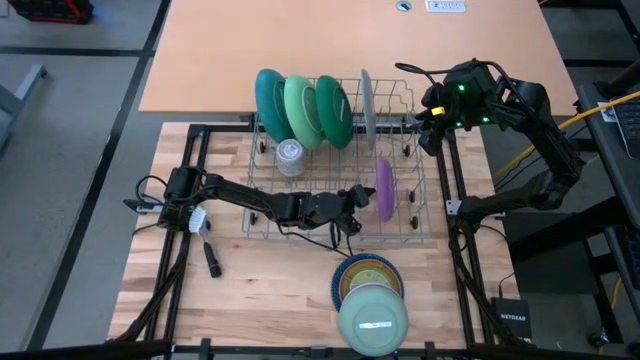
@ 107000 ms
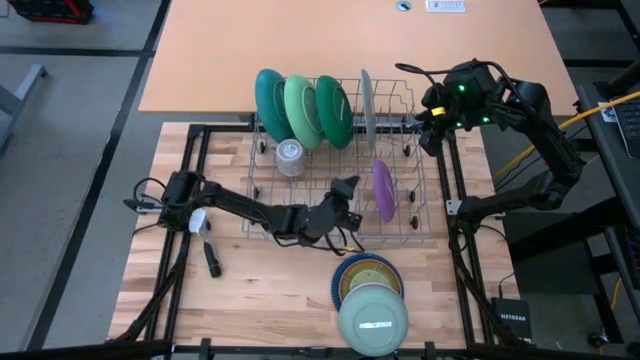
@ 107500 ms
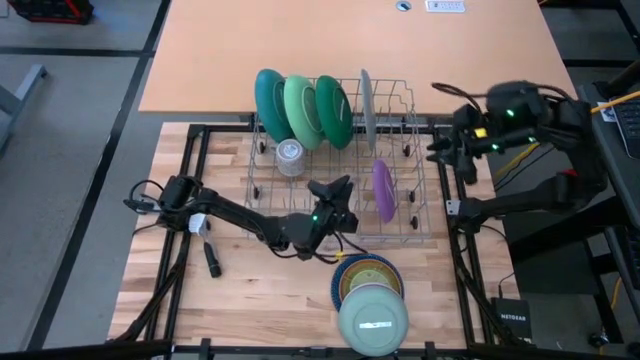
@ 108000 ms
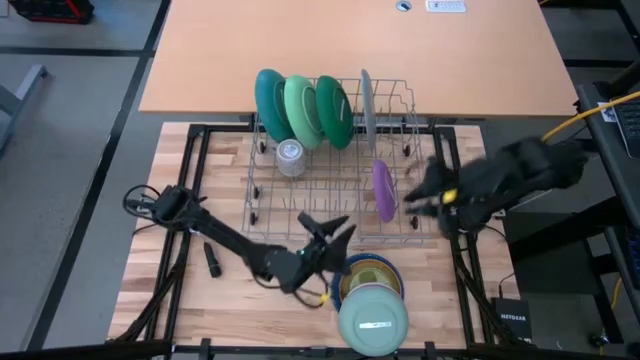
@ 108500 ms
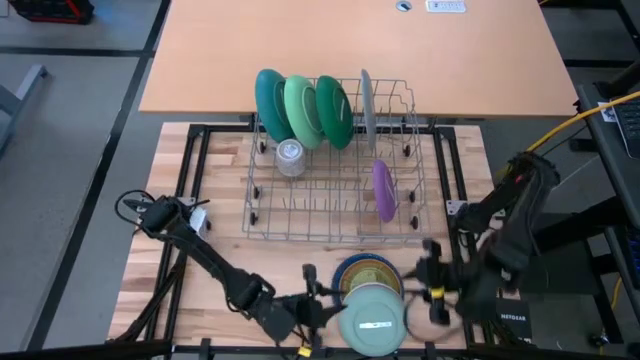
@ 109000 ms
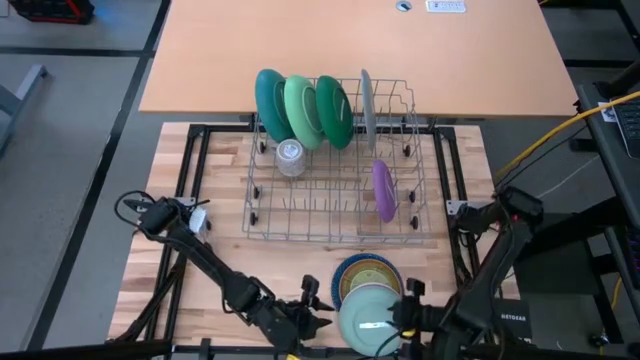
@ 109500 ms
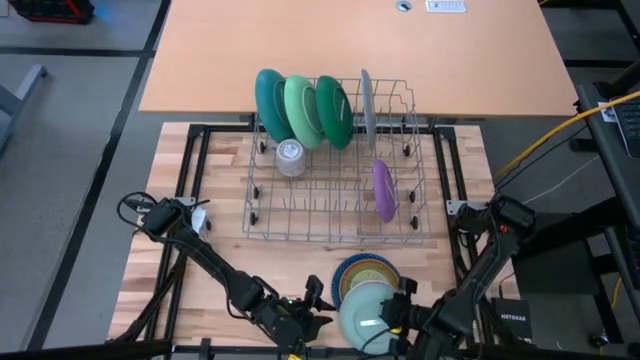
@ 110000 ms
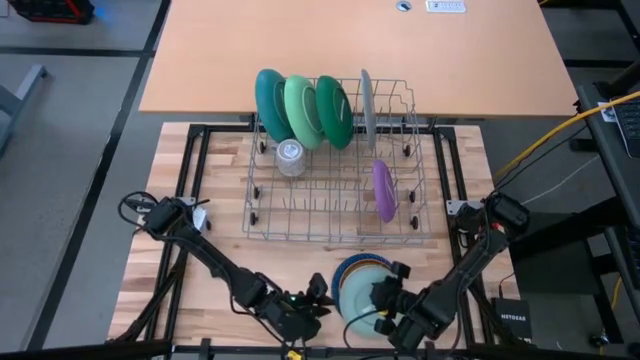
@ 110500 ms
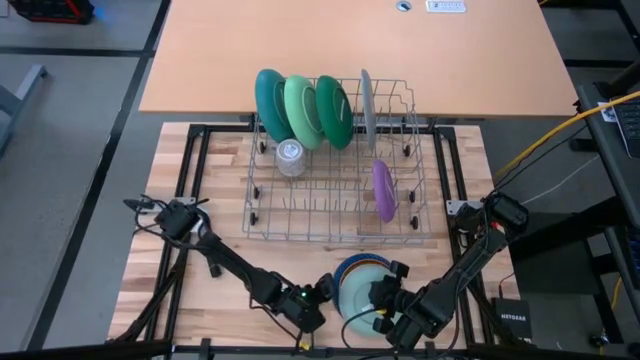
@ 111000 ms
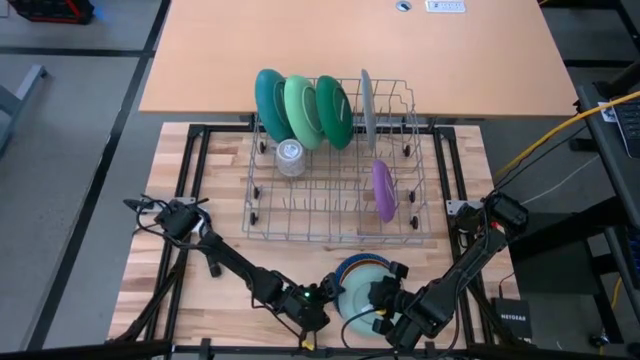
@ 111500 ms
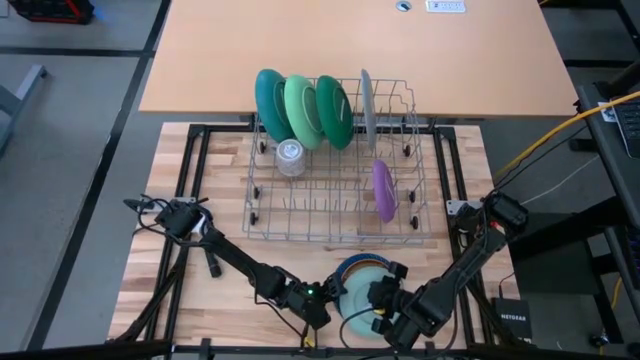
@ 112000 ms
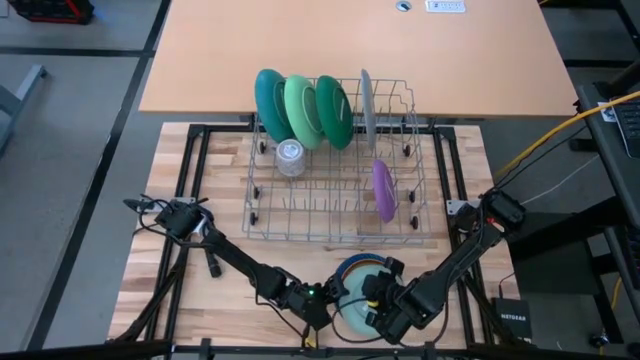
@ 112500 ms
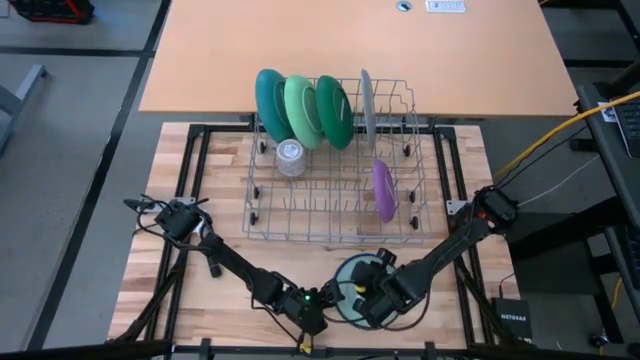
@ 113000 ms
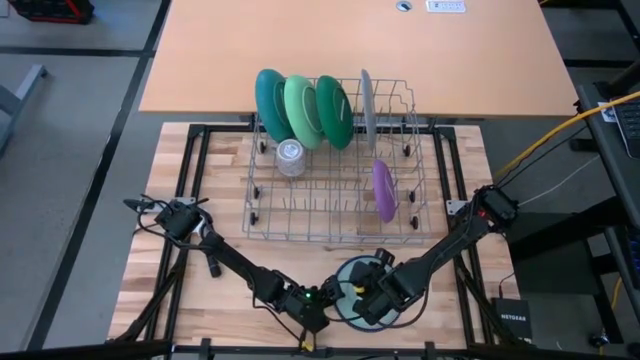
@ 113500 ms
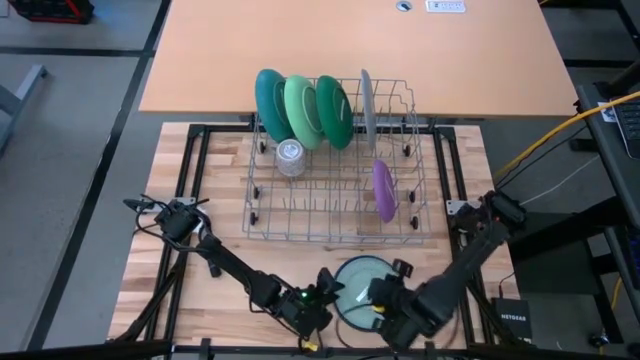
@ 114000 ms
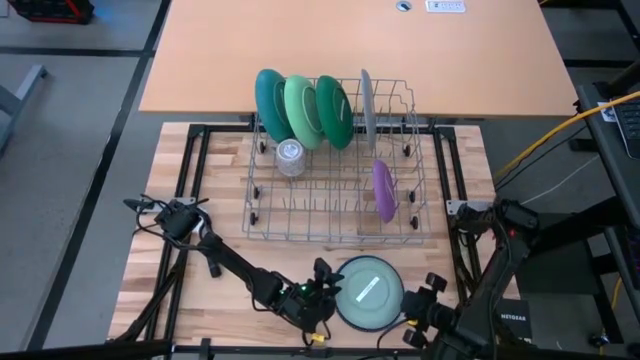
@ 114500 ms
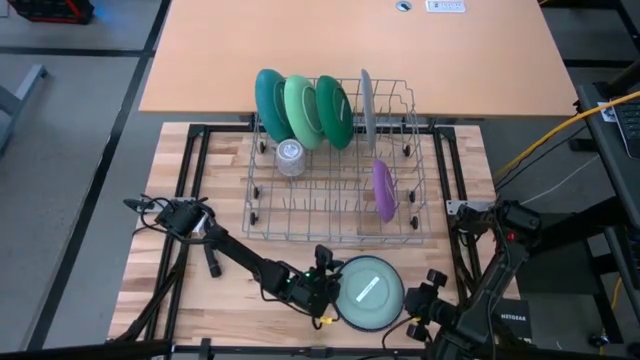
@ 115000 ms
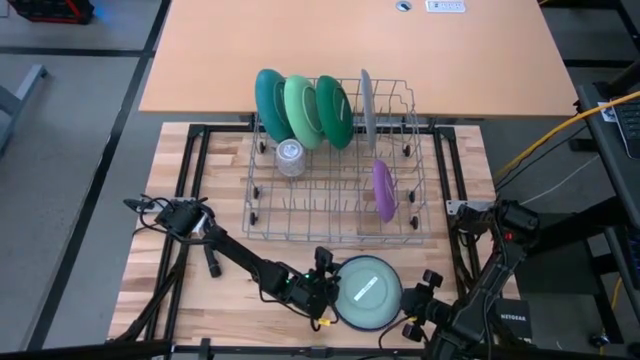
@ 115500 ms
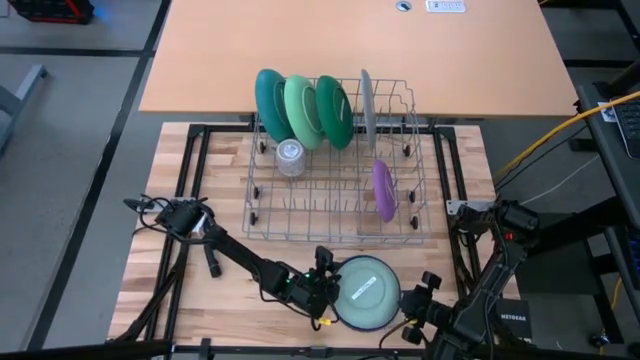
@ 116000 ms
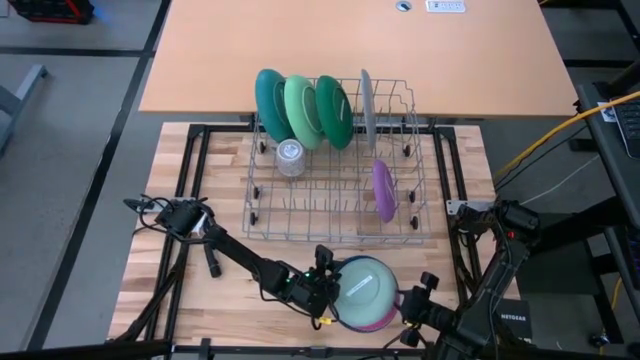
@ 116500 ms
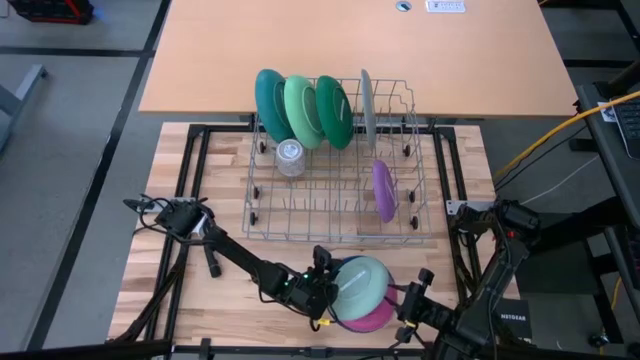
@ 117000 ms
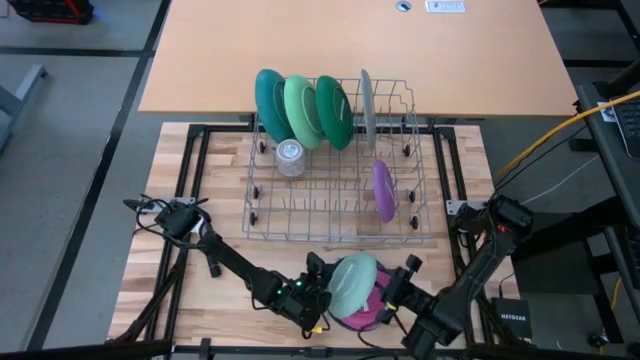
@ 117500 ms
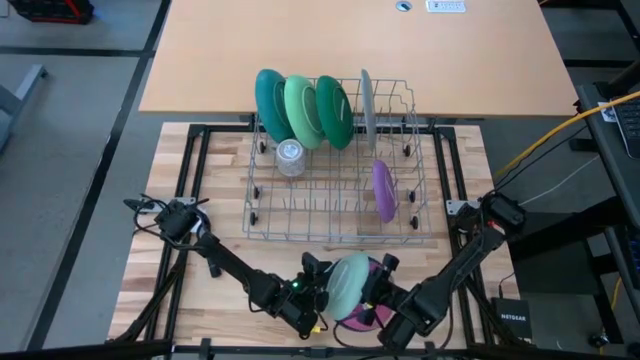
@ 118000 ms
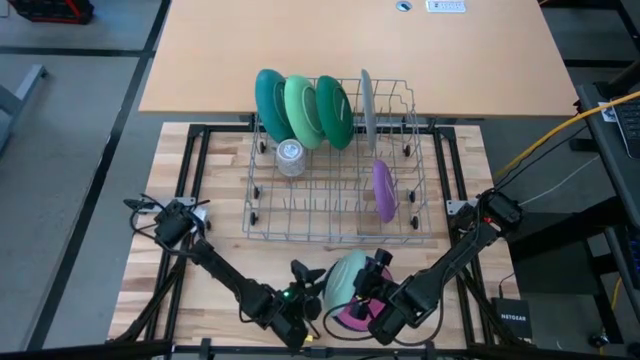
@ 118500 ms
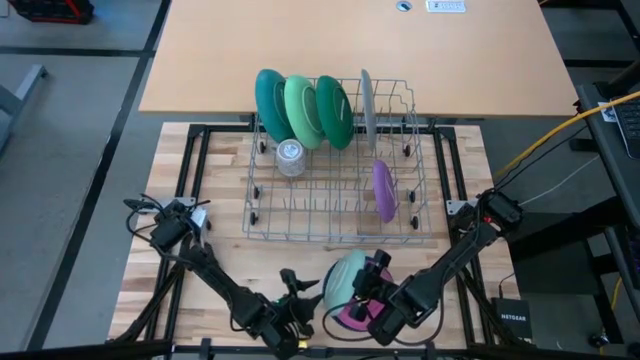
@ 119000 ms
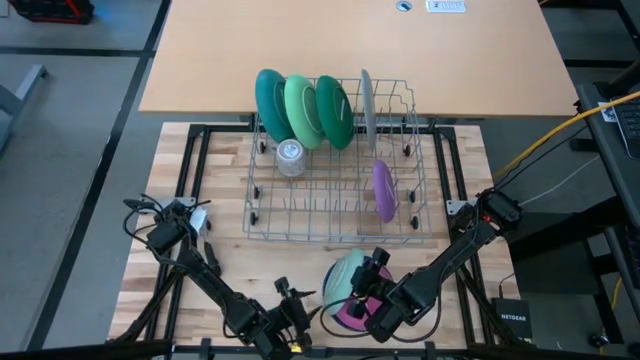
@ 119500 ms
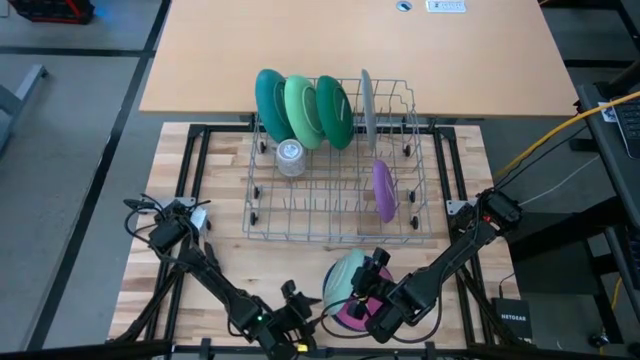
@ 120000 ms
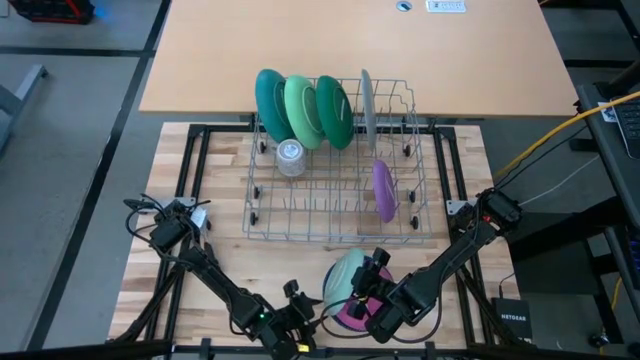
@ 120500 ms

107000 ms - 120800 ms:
Task: Sort dishes
Put the light blue plate in the dish rack

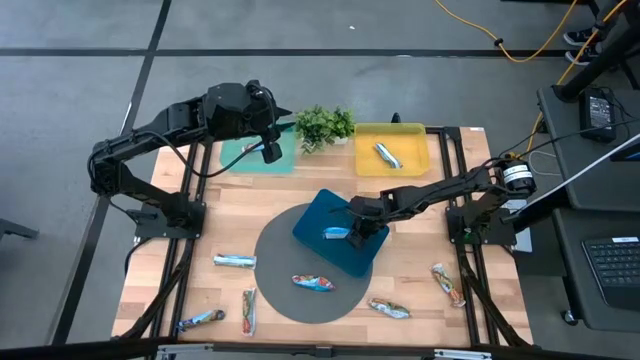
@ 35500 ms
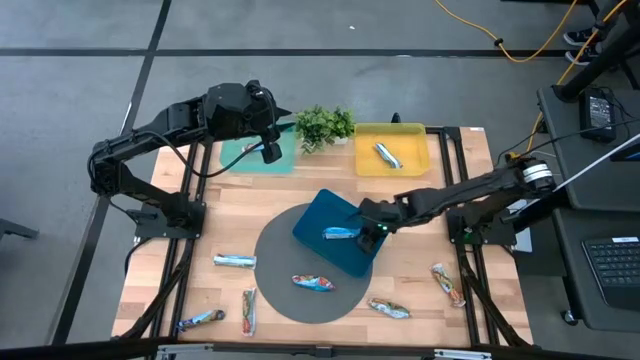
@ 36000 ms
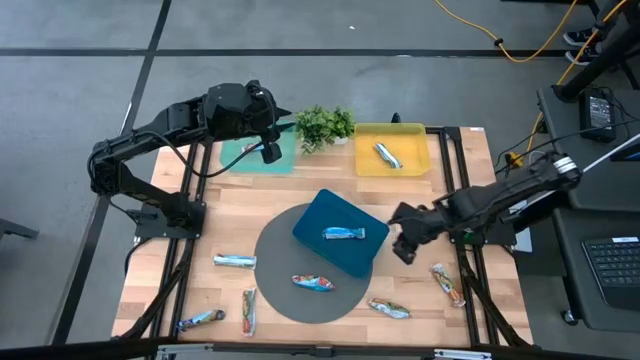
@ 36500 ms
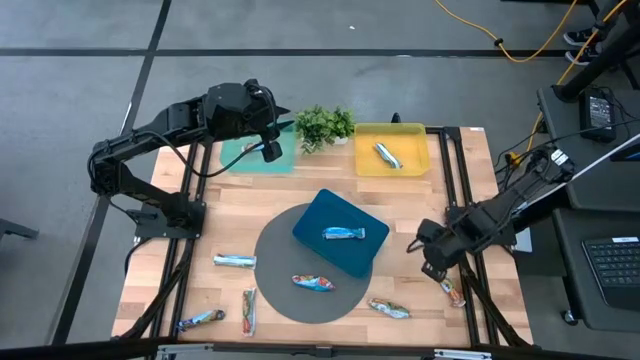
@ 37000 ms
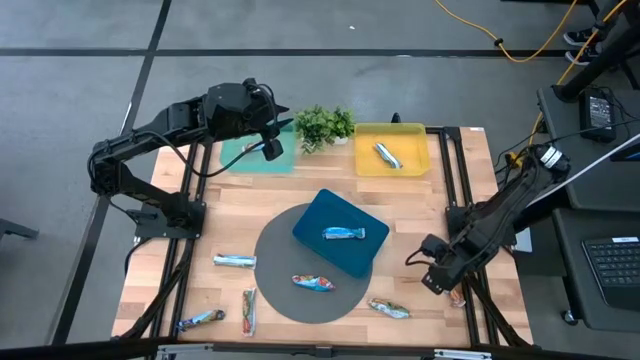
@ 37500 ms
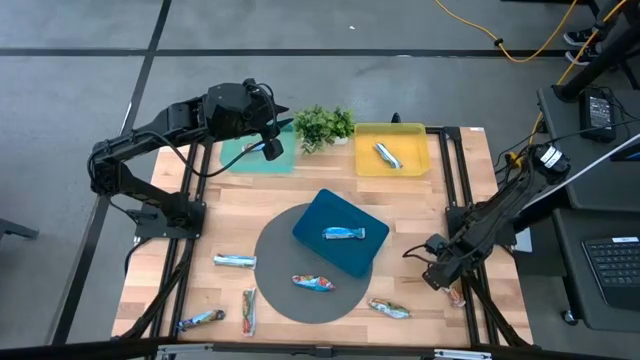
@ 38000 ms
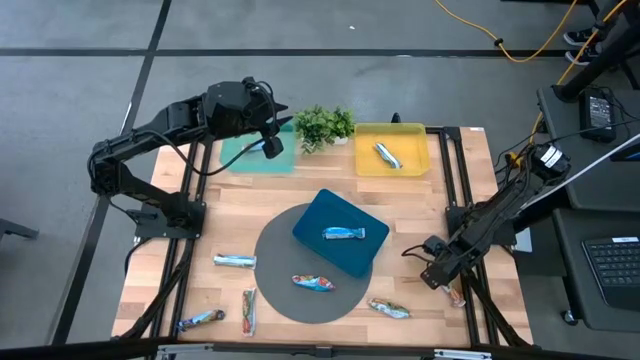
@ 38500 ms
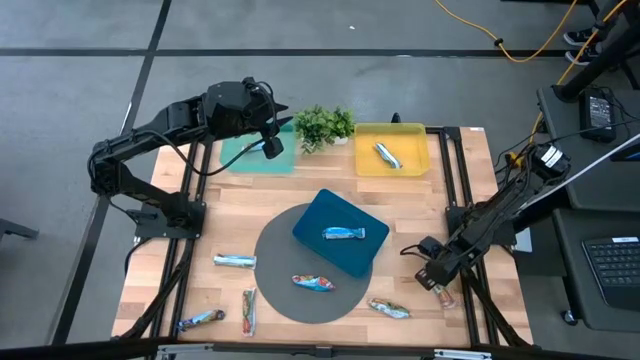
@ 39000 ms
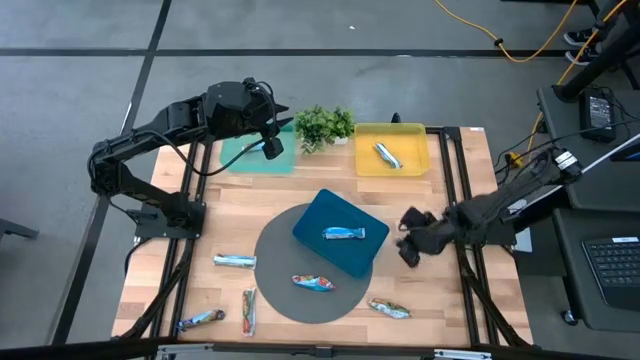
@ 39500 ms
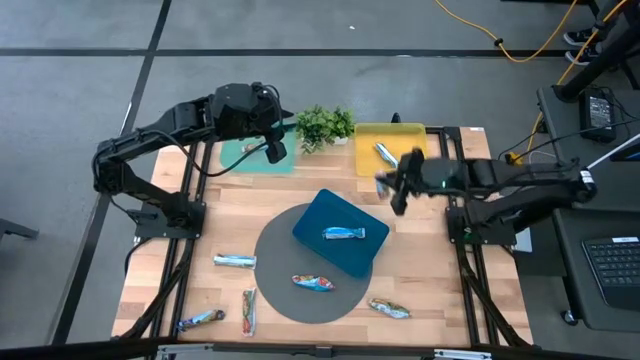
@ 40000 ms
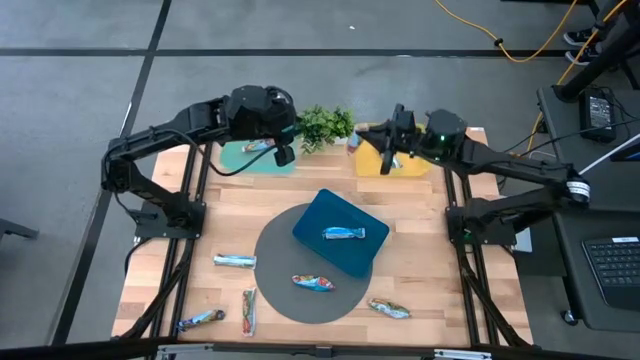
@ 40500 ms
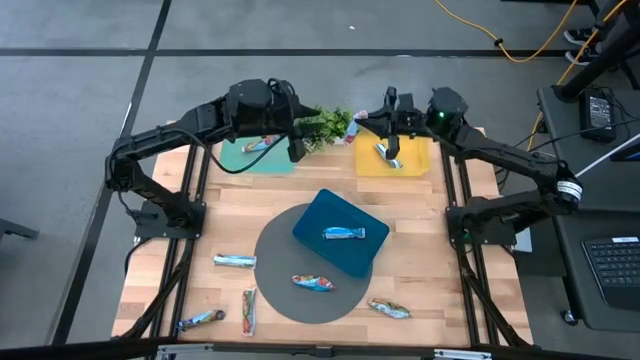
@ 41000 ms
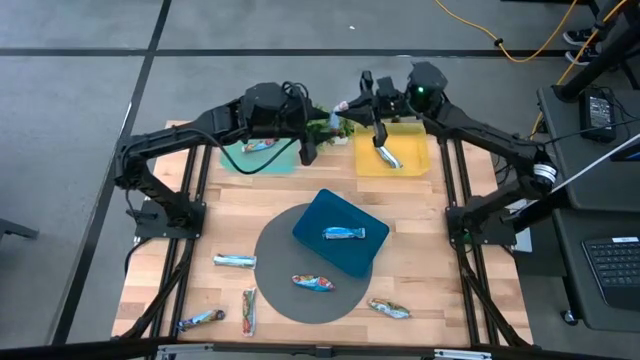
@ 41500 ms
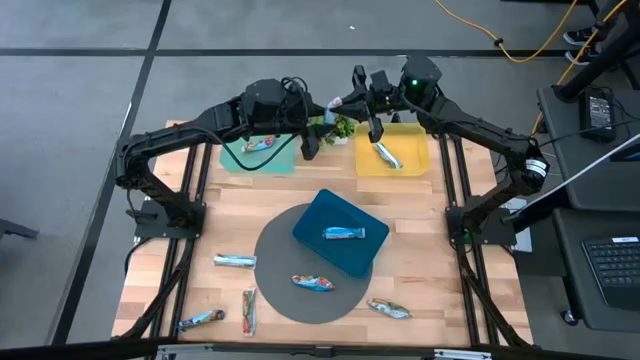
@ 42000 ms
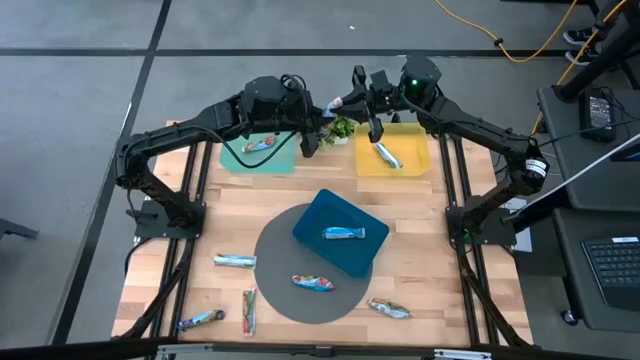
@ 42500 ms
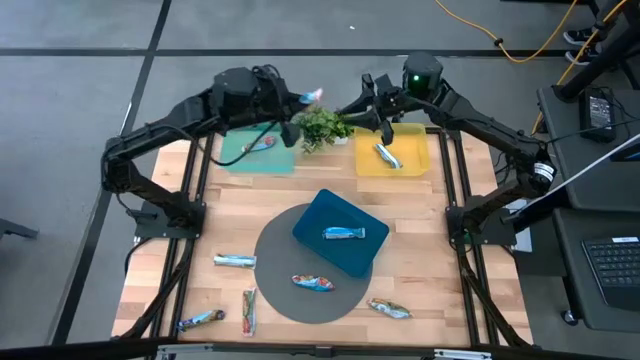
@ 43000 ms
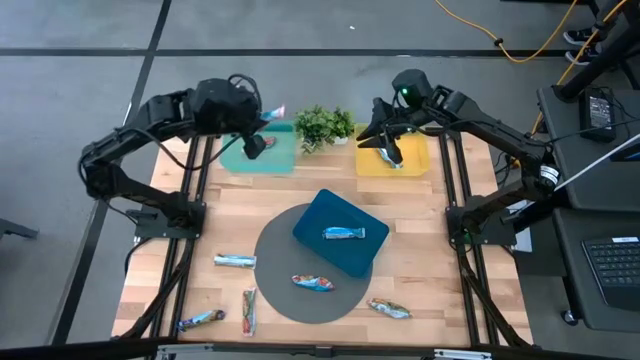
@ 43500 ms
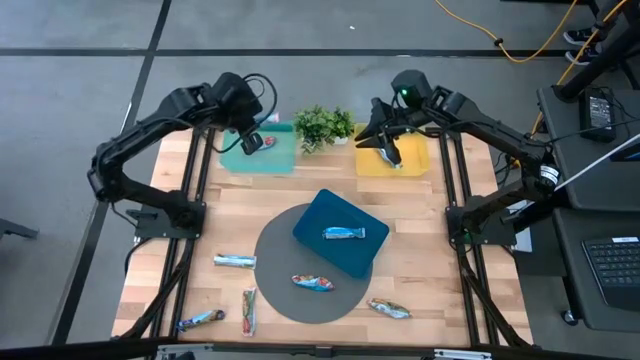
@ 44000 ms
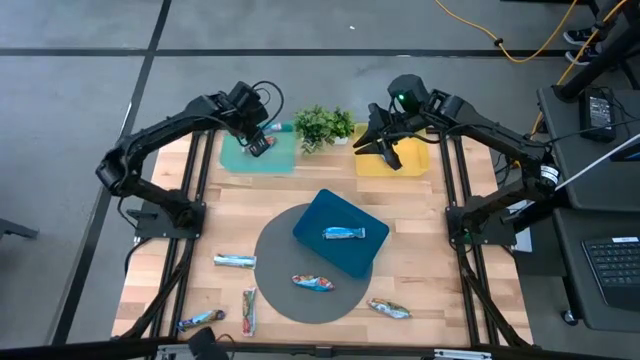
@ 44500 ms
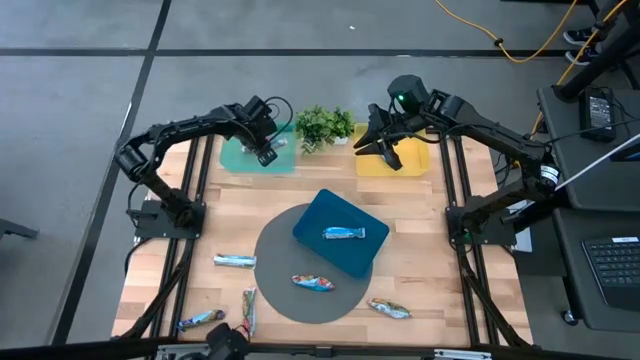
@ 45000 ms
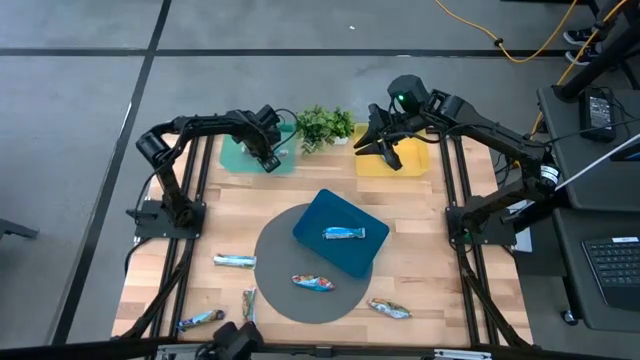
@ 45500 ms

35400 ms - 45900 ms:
Task: Pick and place Granola Bars by type
Put the right red granola bar into the green bin
